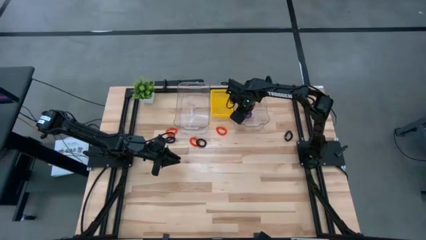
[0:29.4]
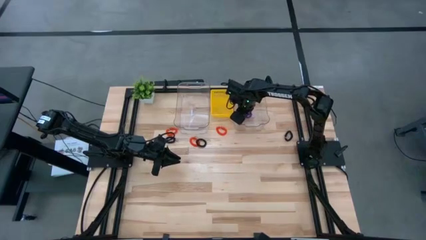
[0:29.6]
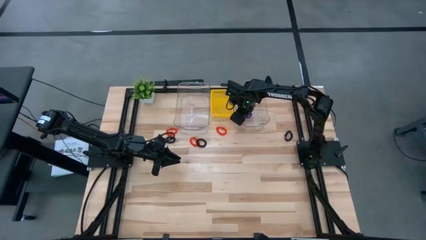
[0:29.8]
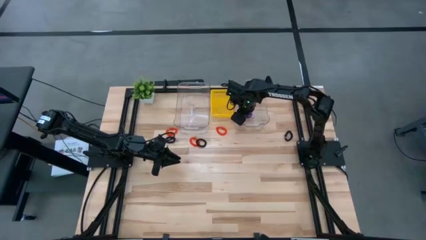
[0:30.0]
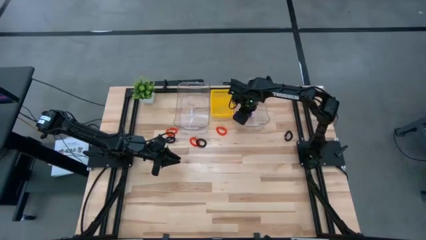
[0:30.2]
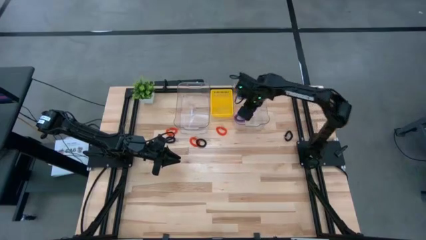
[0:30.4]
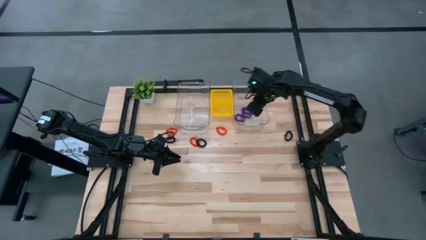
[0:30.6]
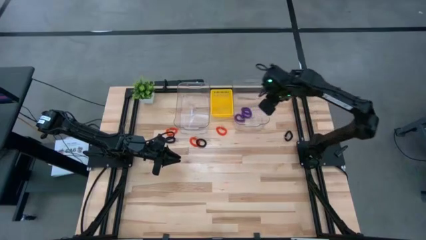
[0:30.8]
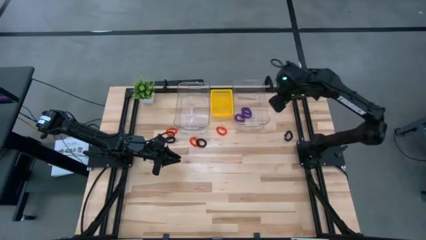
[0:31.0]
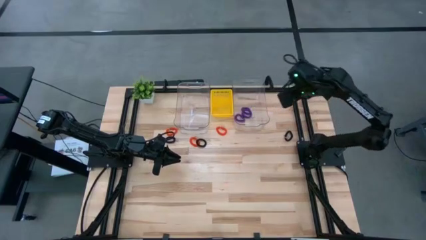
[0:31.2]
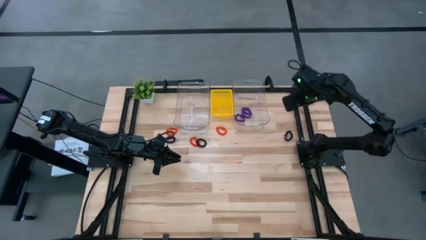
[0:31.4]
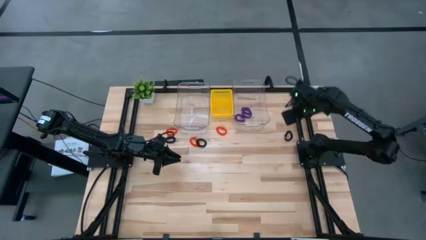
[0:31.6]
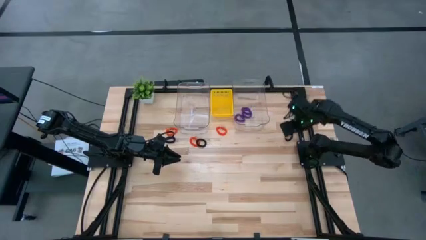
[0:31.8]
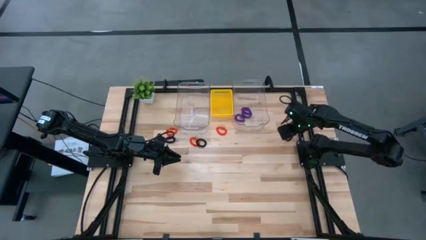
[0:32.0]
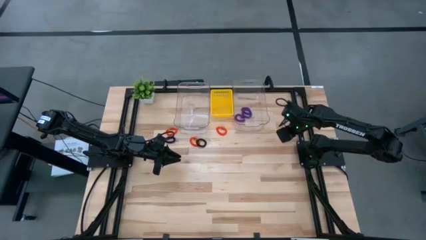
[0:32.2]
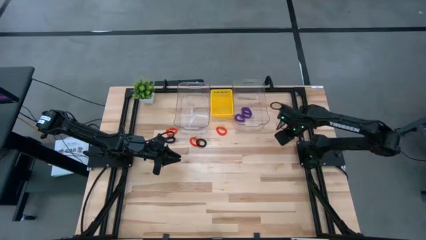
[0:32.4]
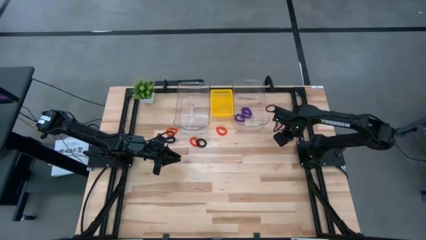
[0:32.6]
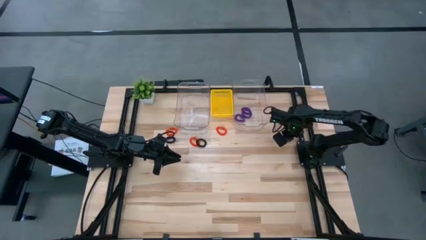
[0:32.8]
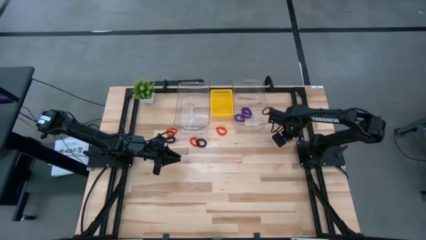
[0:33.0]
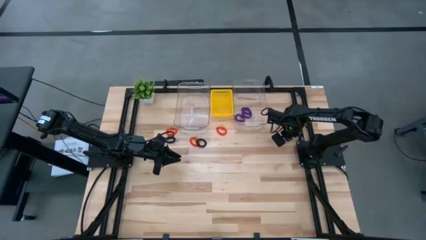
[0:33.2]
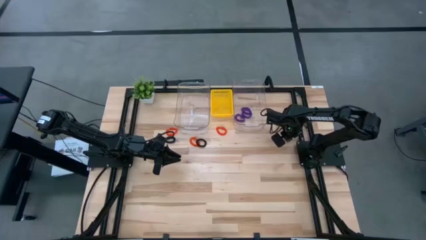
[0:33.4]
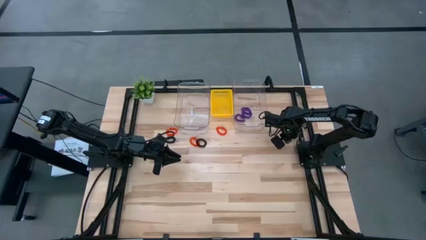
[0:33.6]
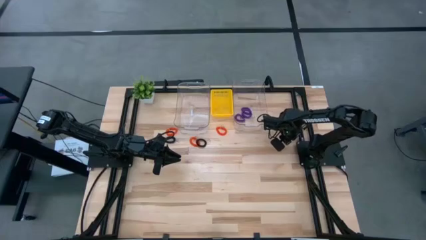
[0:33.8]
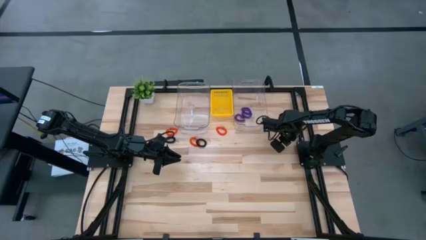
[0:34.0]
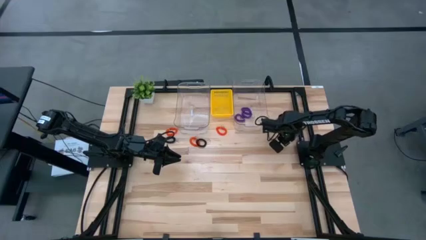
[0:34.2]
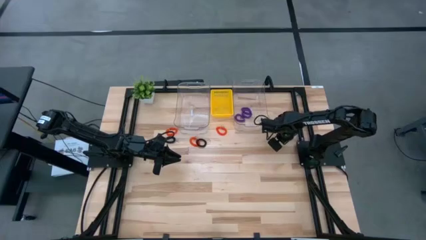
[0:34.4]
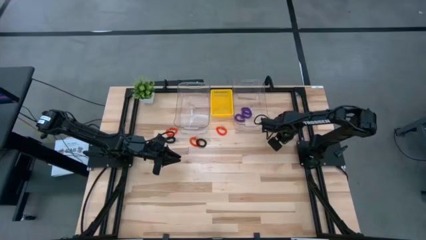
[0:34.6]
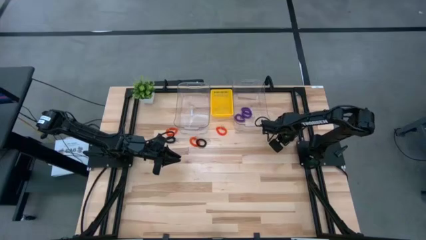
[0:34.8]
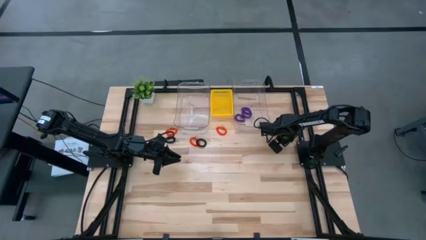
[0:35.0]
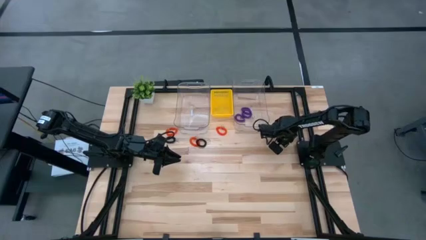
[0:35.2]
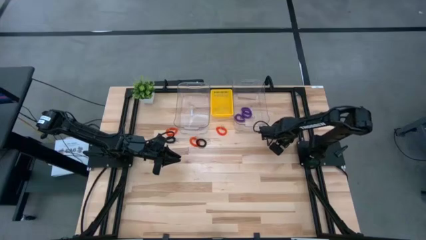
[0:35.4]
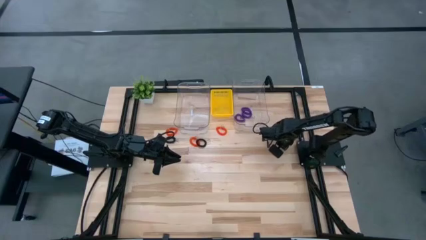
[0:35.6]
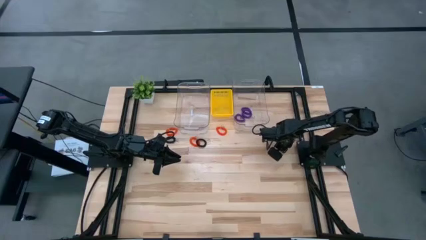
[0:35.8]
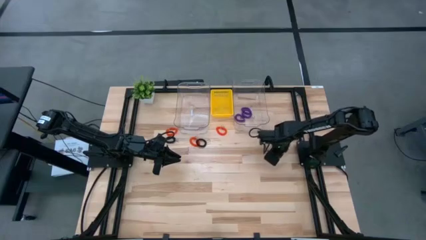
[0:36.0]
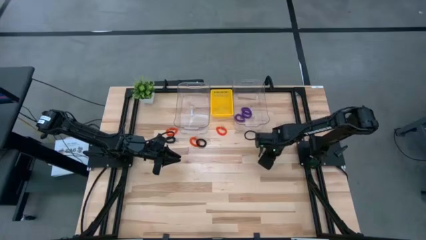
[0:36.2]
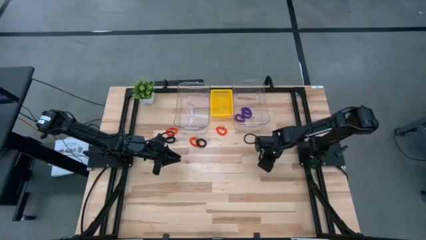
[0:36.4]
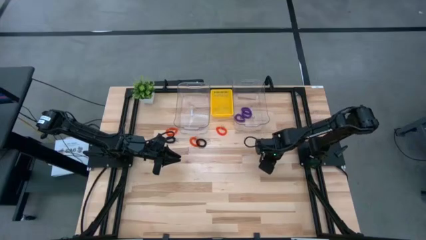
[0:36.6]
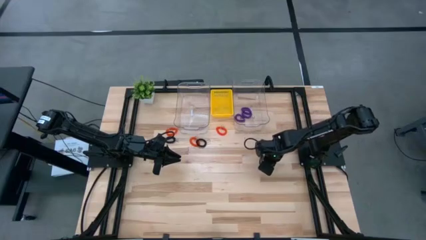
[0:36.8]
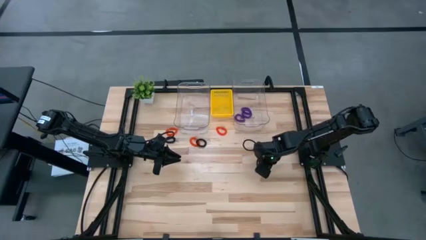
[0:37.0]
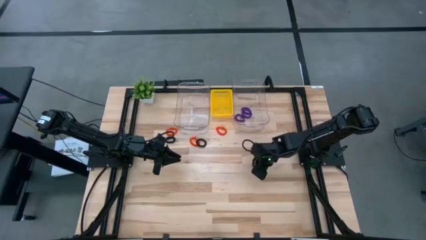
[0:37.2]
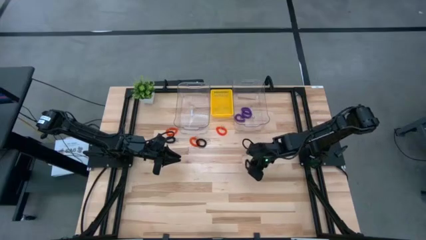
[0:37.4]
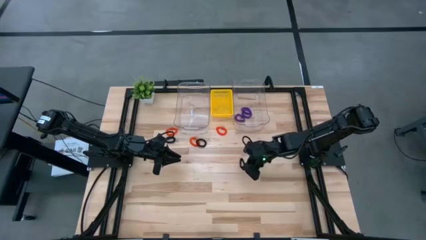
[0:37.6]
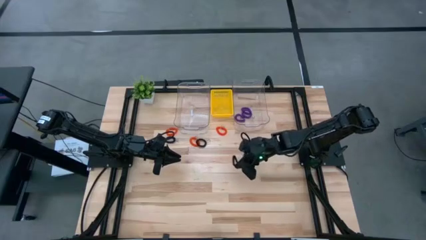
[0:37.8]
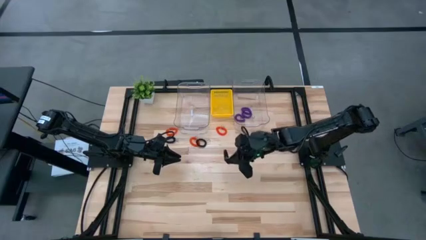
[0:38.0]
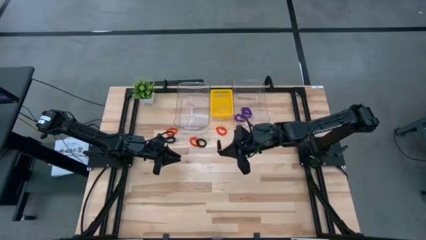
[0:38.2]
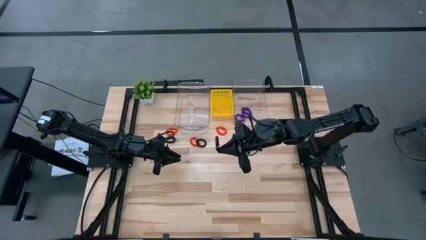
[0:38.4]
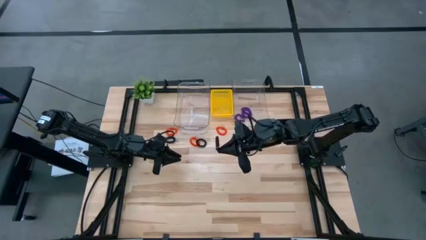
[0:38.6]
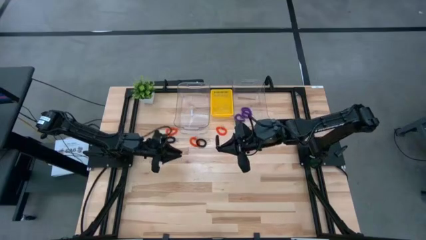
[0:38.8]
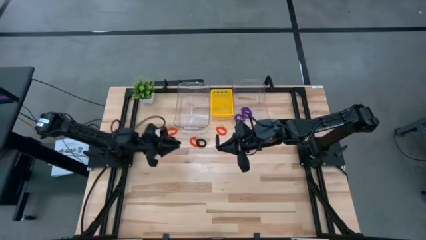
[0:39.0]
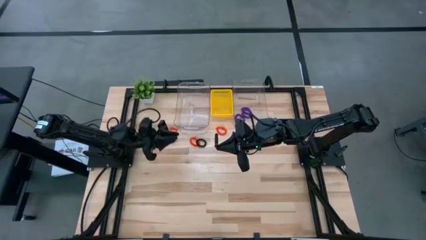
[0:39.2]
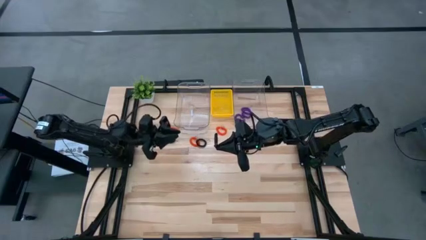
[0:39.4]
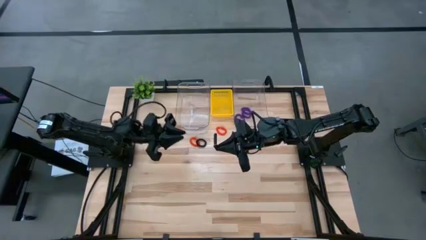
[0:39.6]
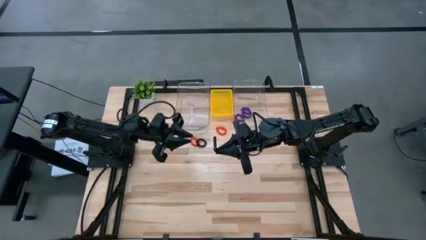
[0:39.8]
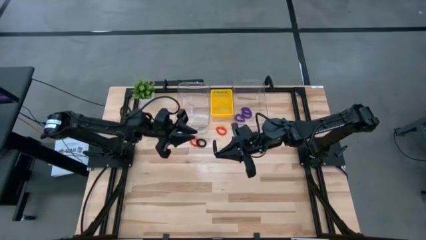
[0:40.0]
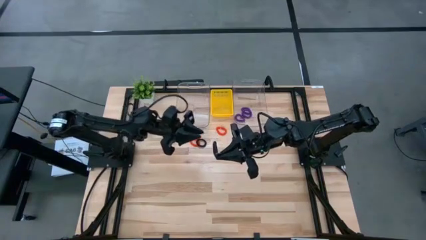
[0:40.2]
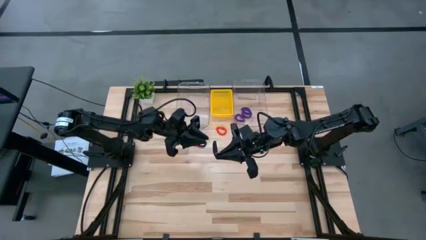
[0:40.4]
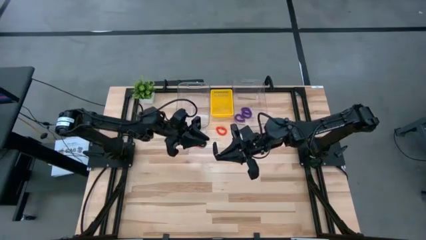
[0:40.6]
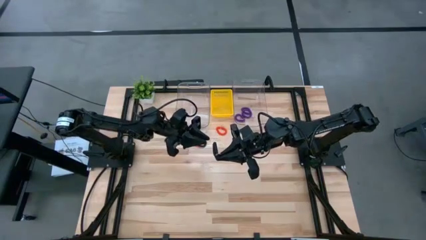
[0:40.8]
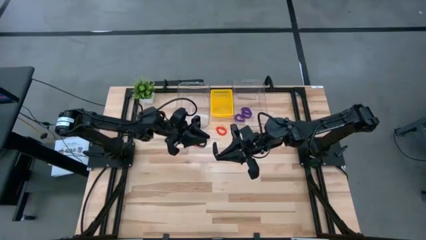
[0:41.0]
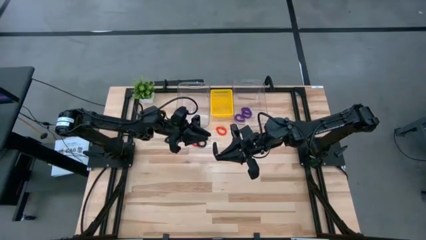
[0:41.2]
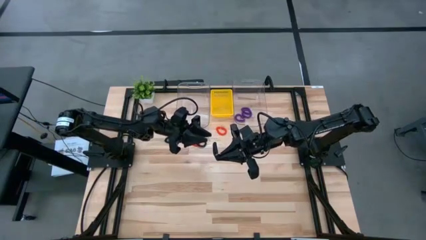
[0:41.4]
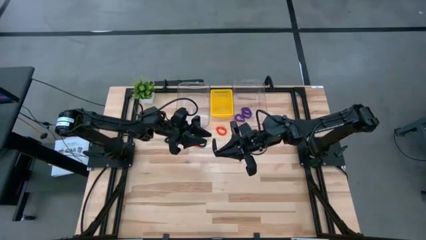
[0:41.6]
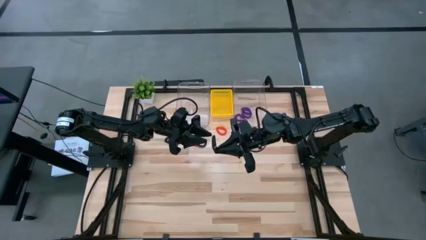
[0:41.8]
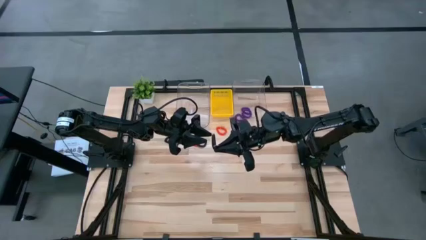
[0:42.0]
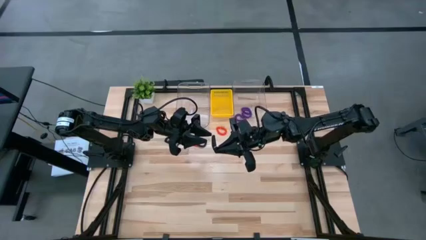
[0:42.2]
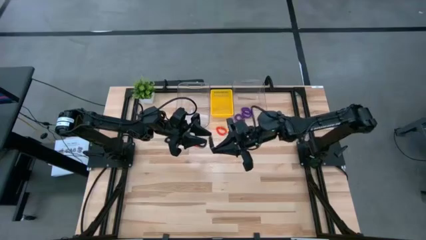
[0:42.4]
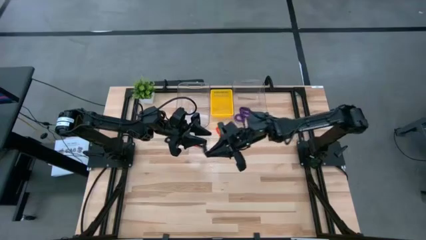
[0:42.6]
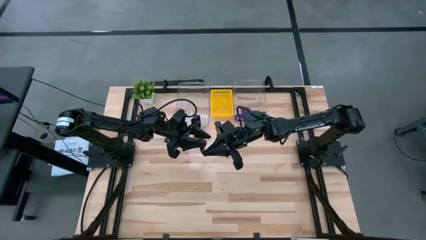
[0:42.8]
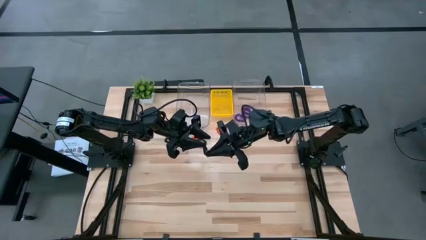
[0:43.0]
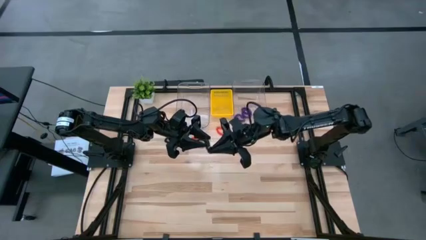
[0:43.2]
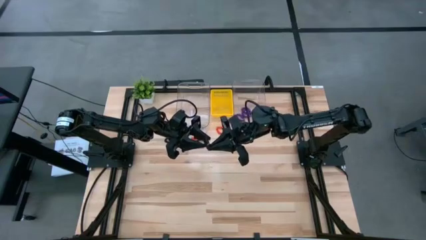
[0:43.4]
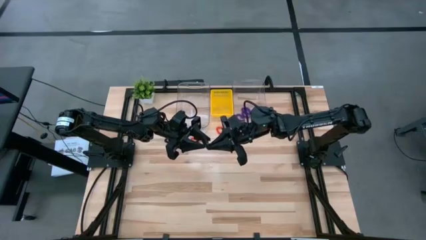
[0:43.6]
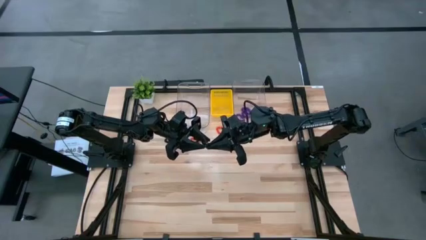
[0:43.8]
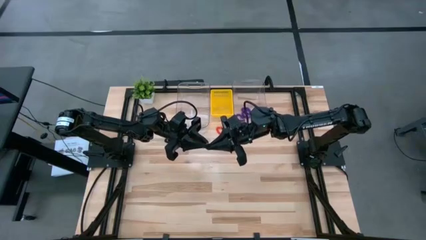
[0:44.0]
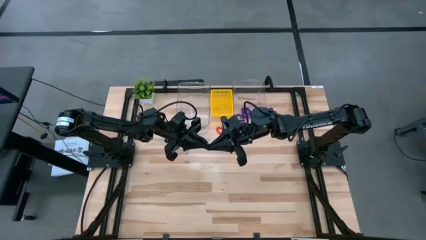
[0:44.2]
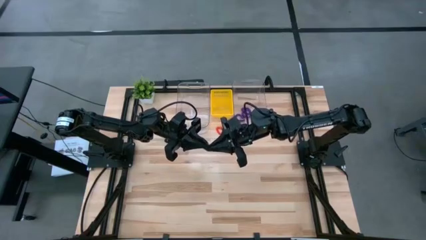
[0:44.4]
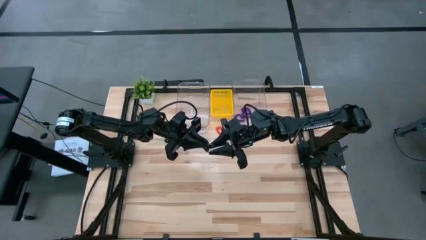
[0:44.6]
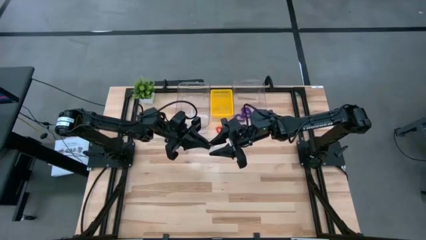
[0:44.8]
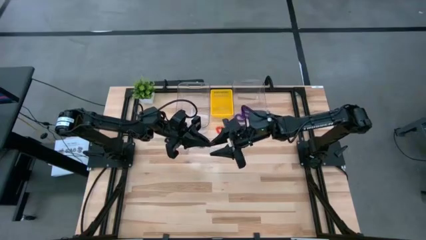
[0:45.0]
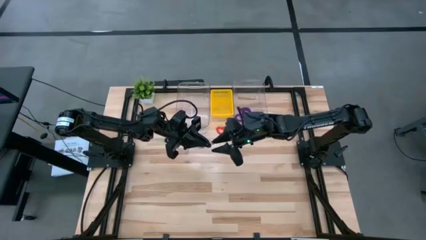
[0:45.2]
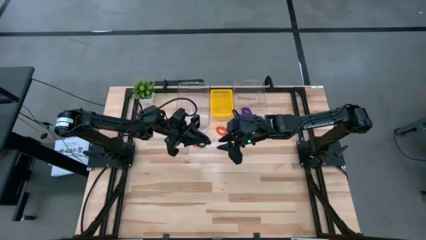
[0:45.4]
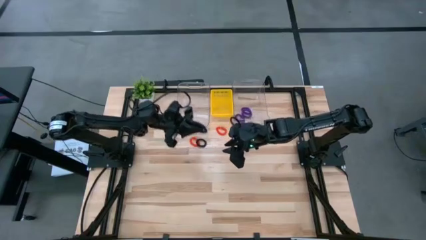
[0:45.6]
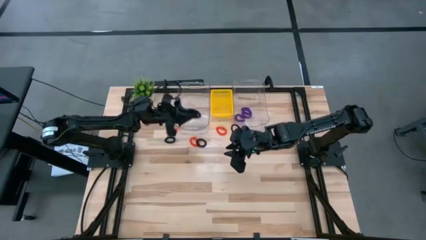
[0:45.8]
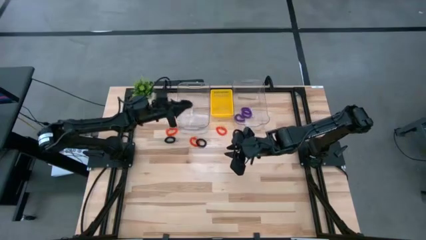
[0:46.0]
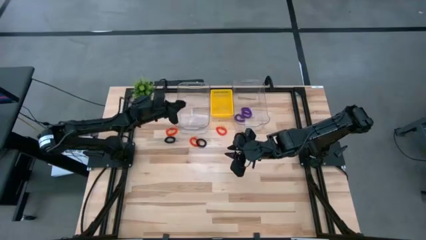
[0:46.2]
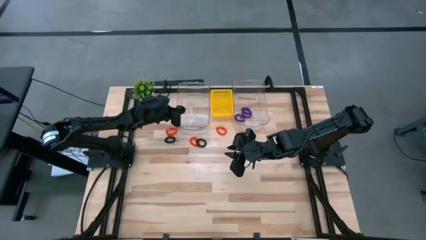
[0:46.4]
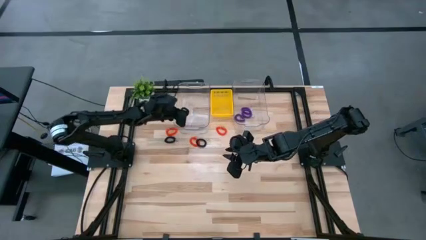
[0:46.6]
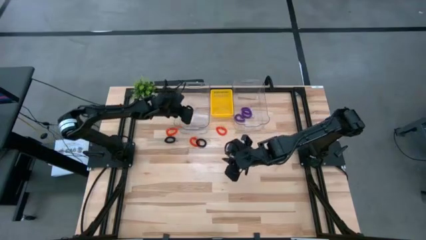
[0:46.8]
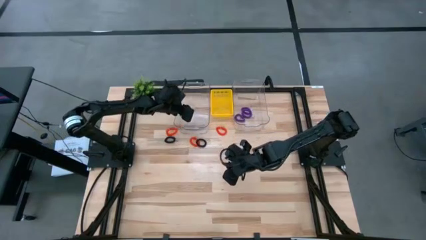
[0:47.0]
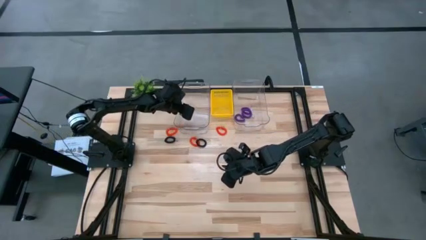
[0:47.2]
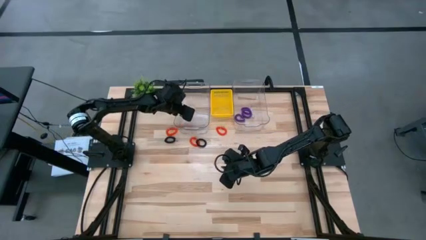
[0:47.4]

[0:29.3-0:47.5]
Task: Sort spring keychains
Put the right black spring keychain into the left transparent bin
